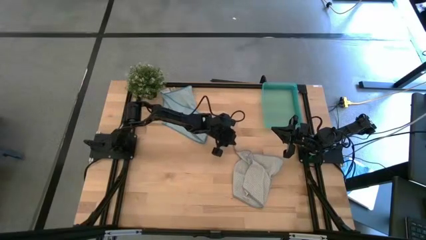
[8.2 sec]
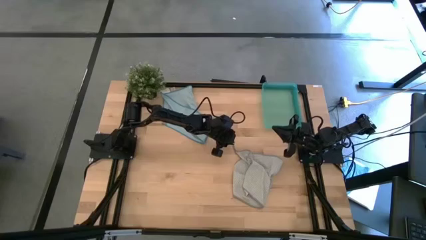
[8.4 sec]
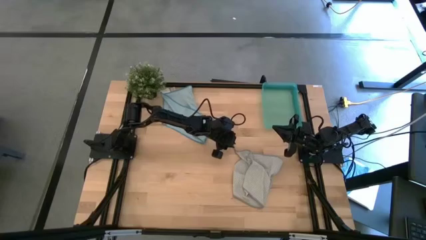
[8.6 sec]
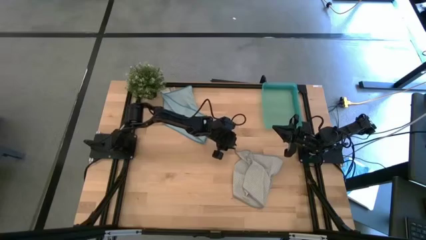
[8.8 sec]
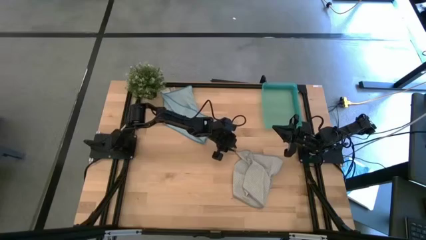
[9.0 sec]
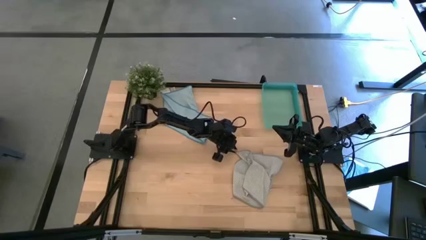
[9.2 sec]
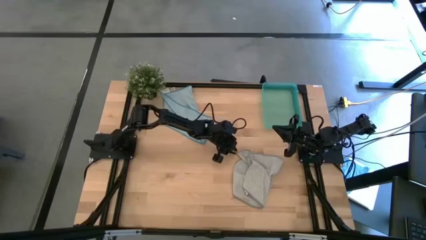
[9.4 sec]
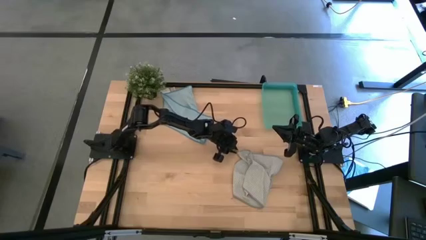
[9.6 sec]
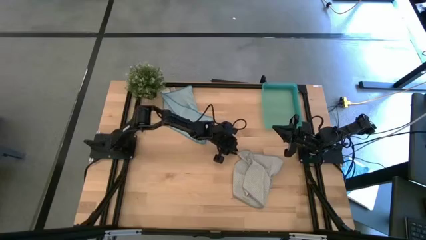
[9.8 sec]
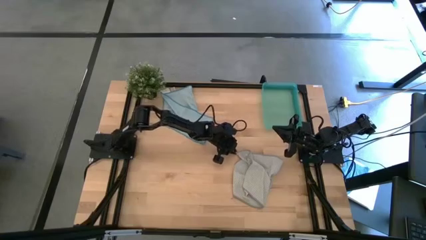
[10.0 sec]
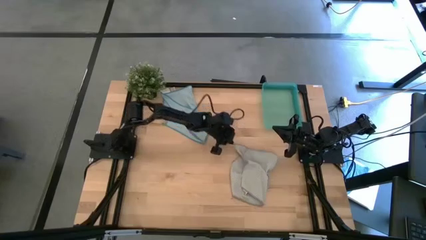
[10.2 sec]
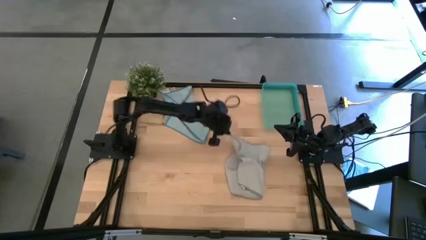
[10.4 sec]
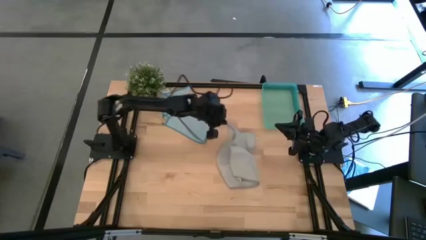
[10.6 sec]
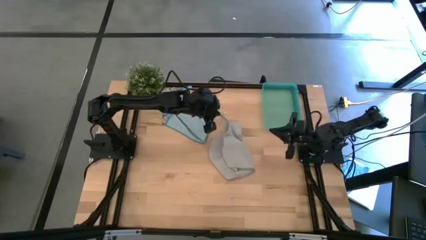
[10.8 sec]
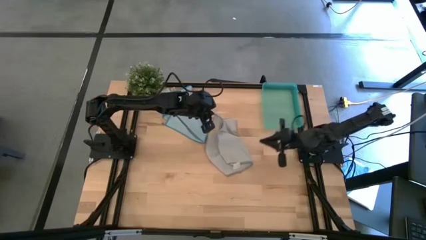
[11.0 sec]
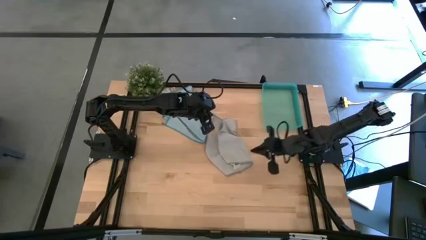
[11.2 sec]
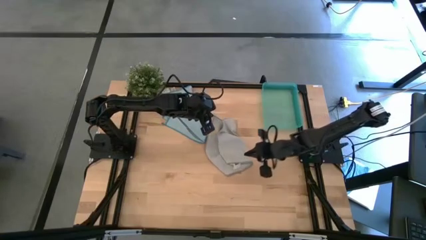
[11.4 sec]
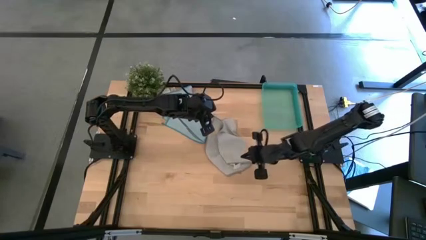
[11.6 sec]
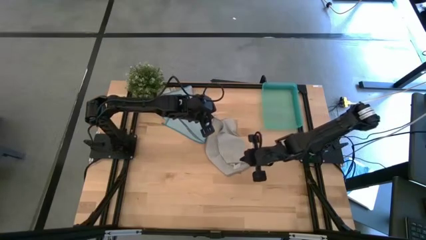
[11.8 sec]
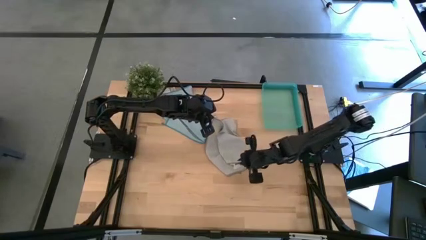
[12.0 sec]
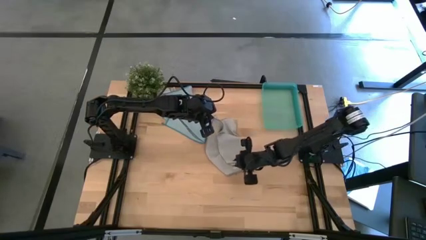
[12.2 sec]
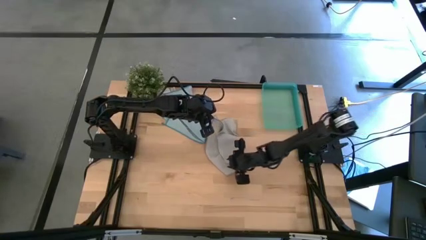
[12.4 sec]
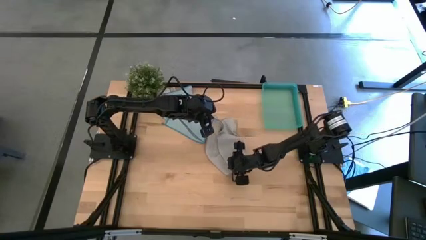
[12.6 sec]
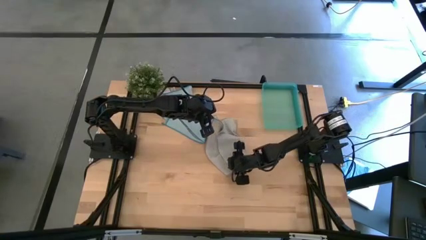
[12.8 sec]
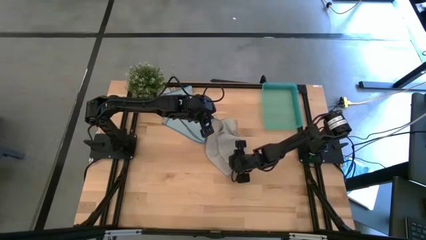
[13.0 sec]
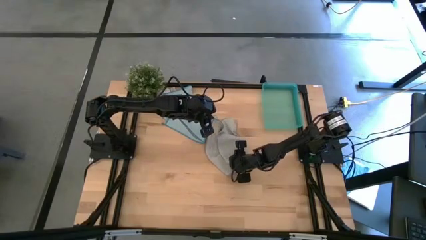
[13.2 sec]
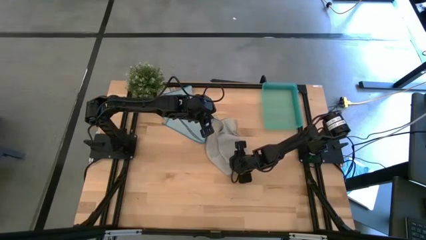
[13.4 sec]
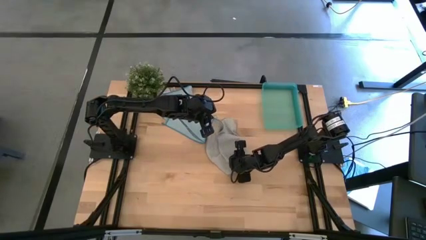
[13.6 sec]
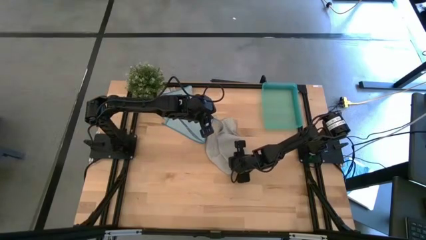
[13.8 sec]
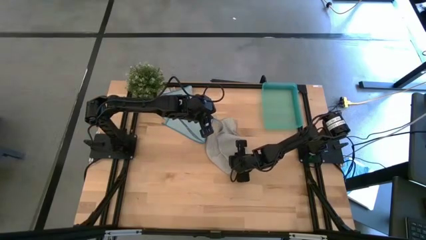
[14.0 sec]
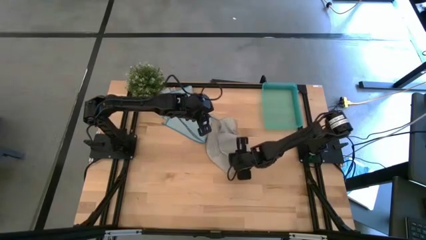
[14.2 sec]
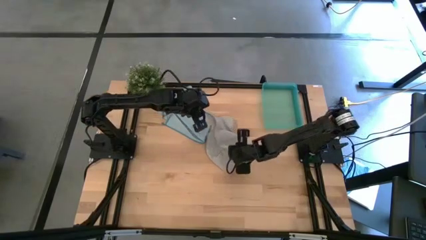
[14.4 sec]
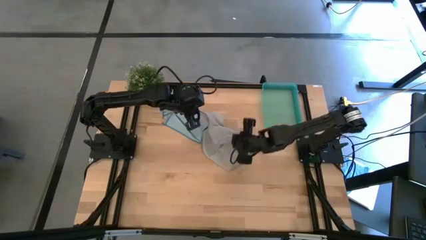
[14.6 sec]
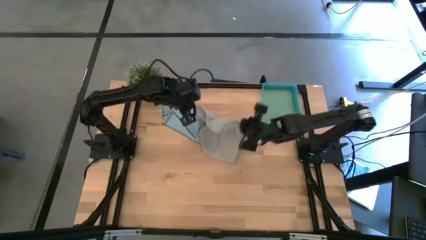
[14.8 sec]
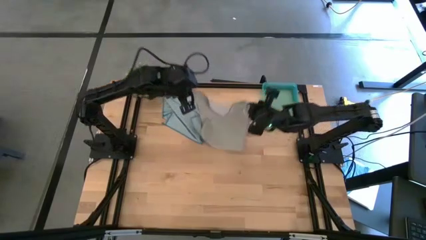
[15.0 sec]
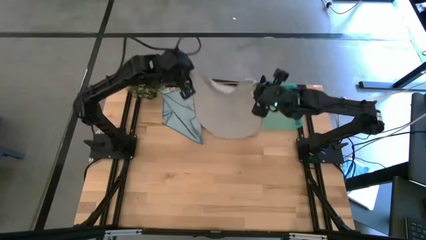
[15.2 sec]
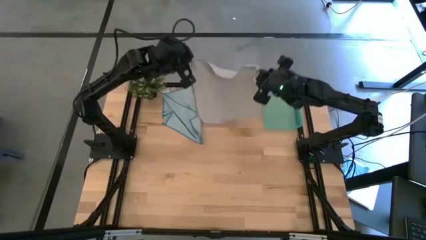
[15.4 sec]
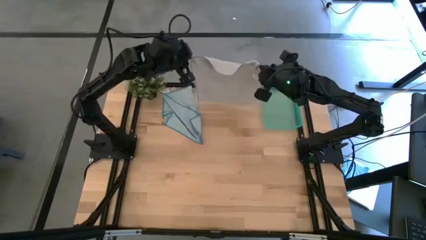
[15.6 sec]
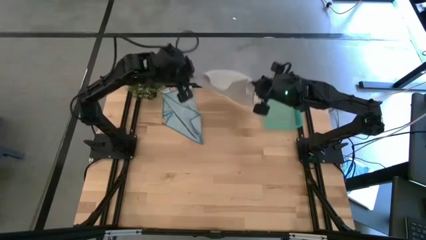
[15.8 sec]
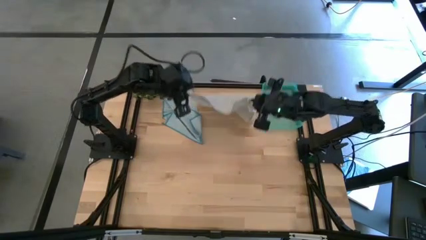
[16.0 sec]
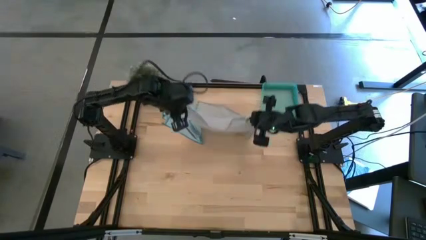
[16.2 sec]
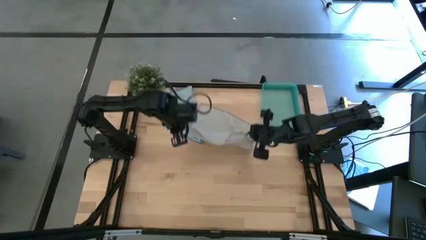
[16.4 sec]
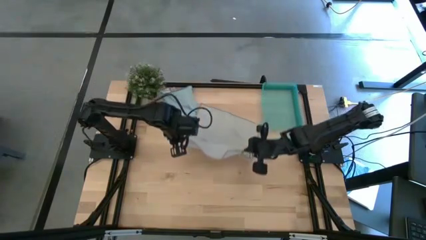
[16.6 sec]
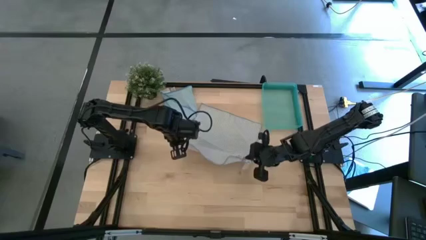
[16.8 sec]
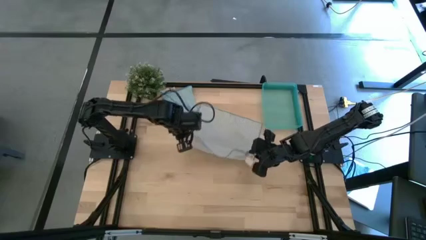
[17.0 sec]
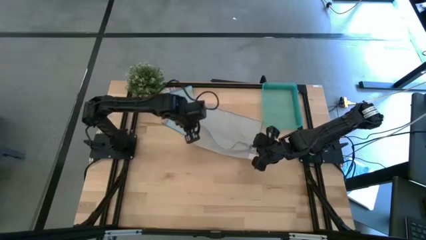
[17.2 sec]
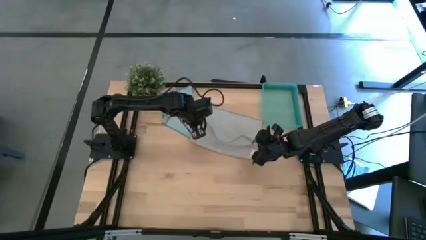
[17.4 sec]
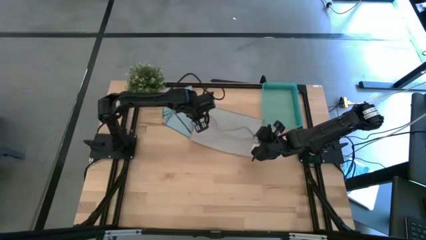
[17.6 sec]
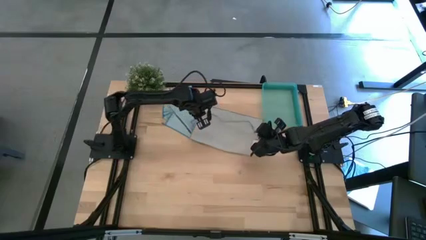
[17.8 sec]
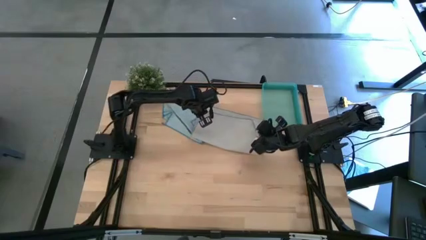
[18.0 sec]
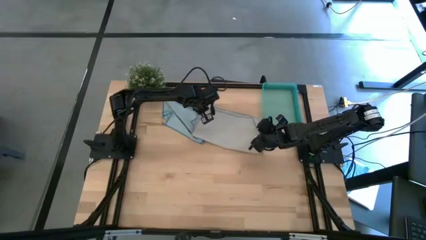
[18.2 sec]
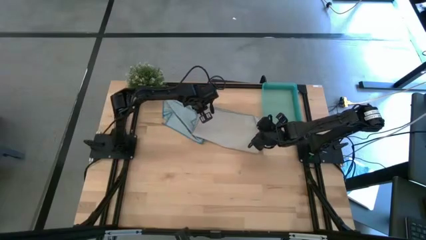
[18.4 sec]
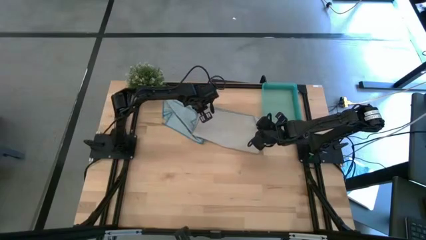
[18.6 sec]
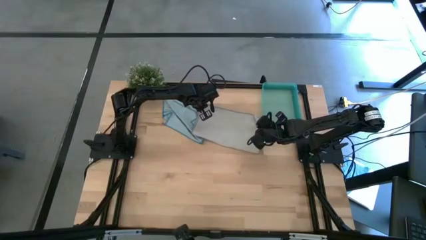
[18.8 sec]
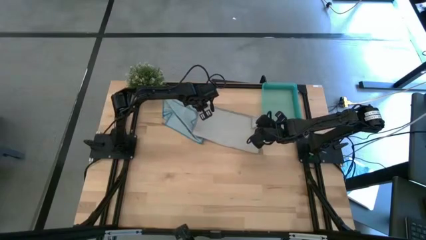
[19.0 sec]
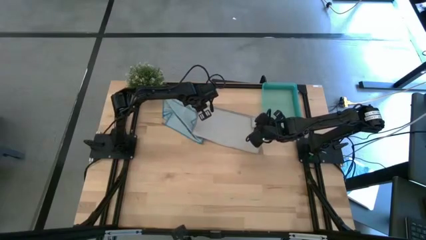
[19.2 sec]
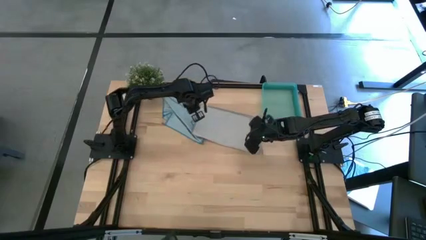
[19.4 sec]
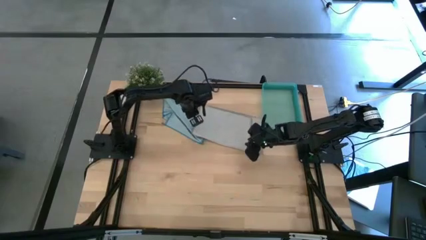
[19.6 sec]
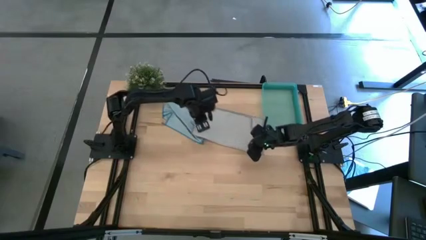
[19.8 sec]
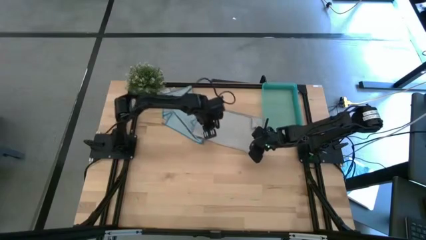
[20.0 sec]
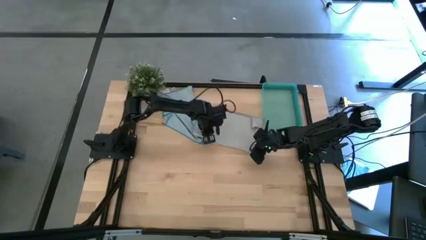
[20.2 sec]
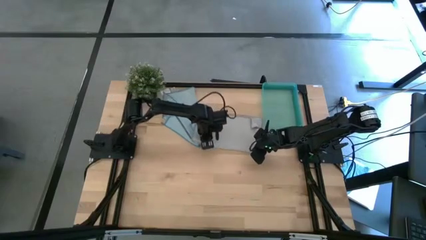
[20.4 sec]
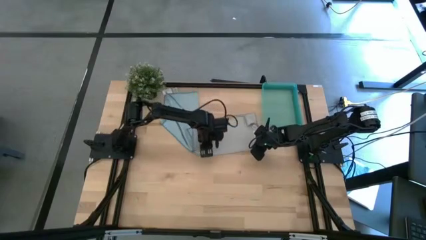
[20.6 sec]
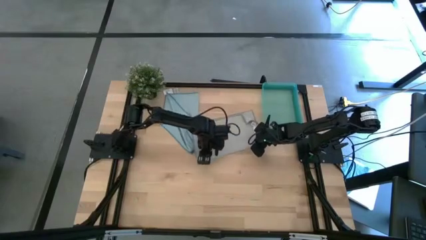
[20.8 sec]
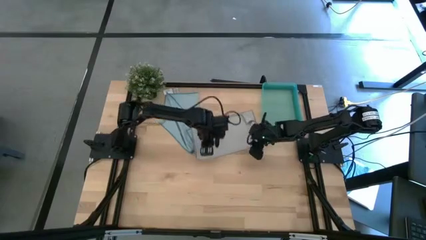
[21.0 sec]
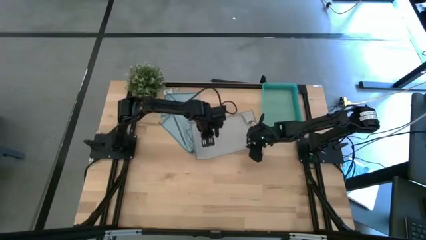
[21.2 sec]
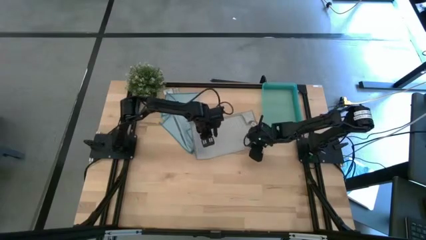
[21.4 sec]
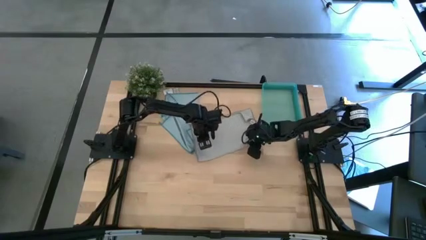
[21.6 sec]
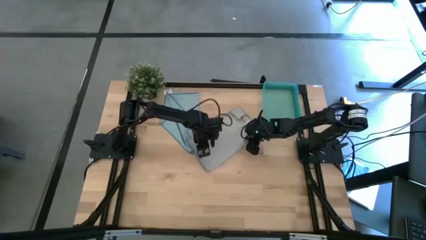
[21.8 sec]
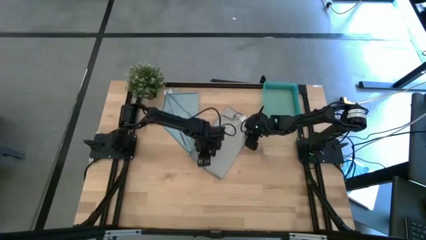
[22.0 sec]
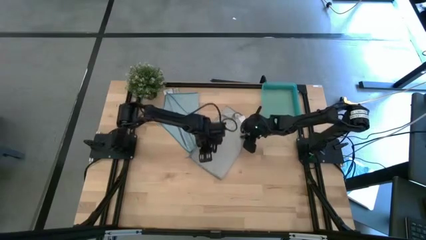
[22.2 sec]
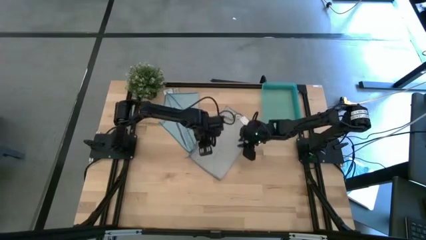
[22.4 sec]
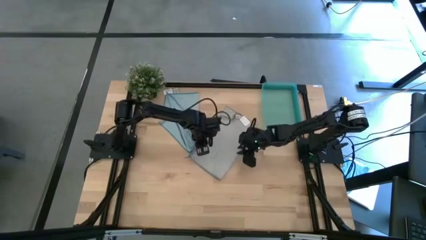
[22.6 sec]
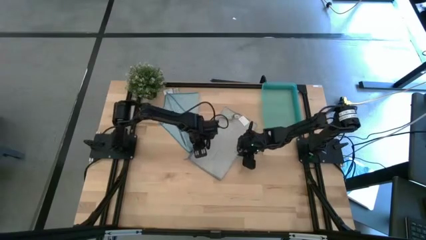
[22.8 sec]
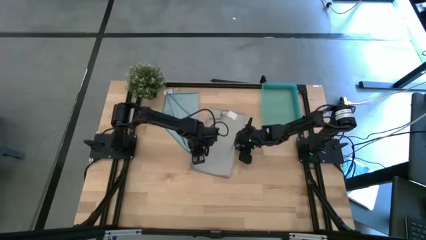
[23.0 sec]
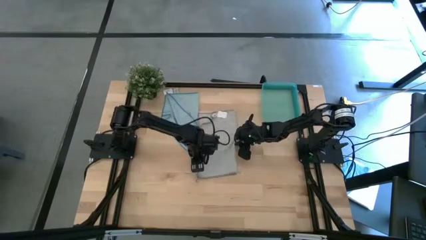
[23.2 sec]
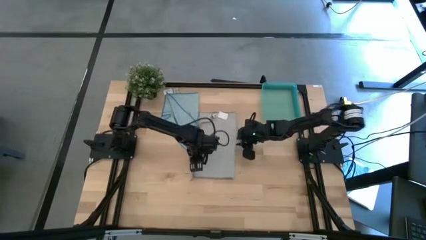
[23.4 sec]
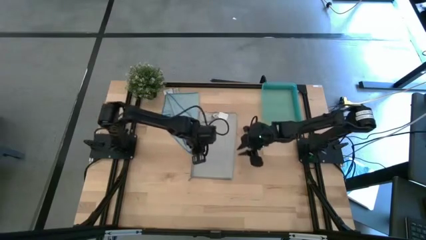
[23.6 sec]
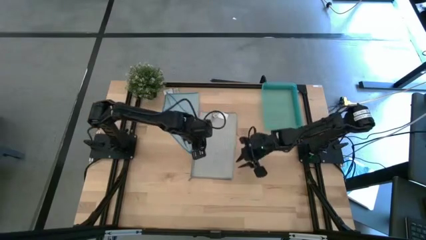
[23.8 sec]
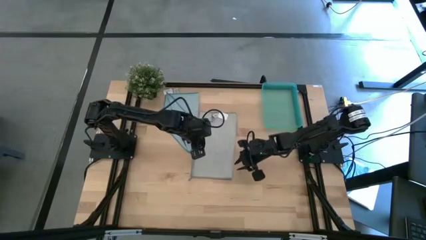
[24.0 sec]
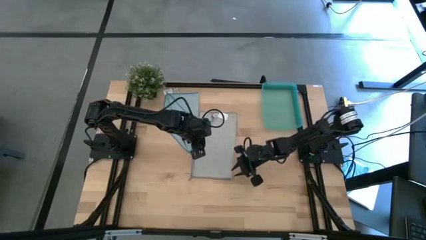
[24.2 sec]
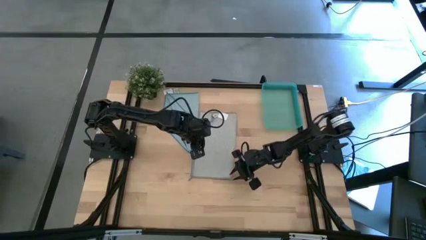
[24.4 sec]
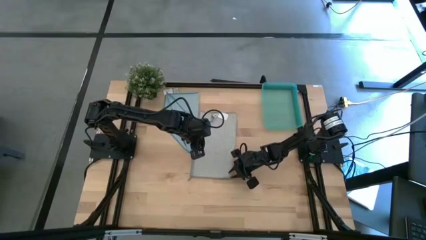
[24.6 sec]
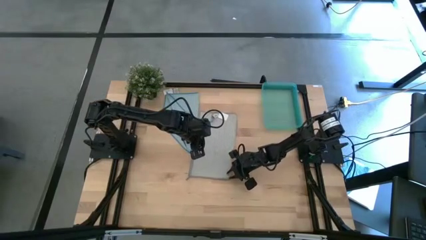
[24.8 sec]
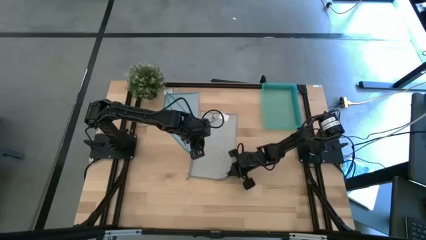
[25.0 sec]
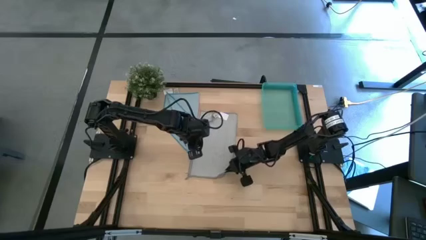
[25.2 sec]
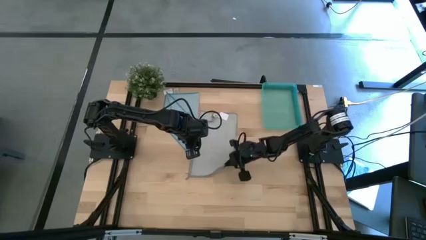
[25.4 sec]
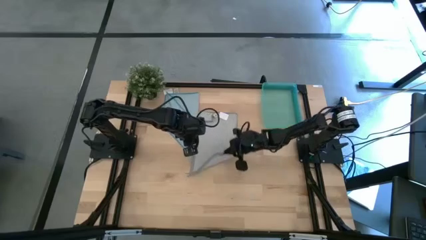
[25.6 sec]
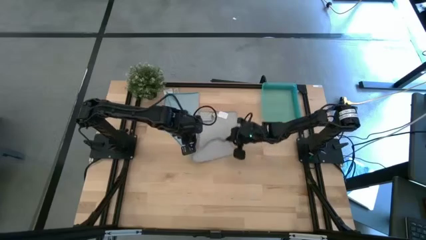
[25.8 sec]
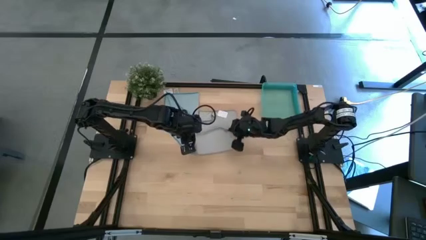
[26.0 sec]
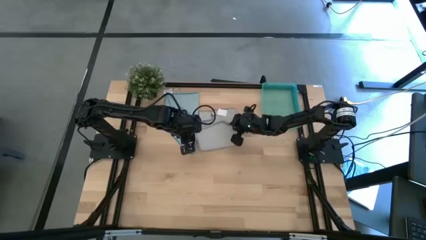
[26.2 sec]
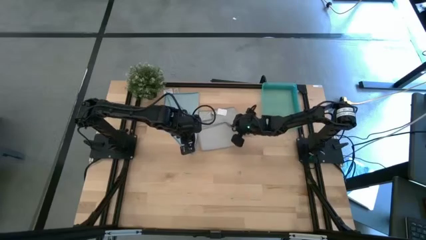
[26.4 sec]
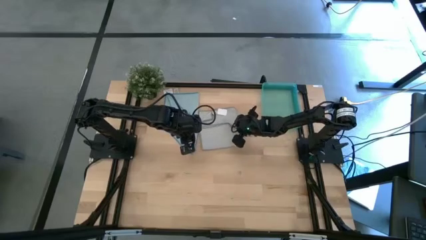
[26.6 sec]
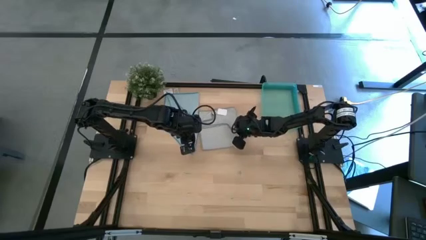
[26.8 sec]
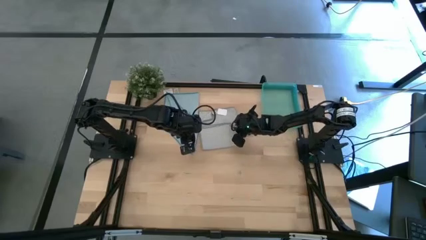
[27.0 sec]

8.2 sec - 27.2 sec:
Task: Roll microfiber towels into tight, uniform cylinder then place into a basket
Fold the gray towel
